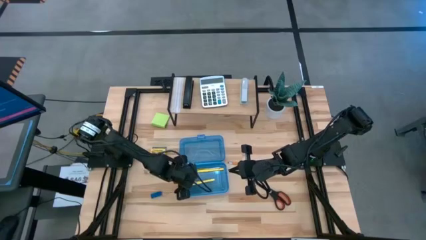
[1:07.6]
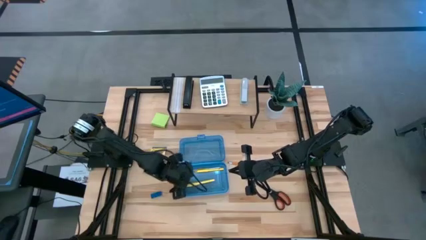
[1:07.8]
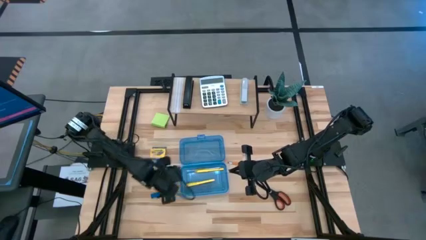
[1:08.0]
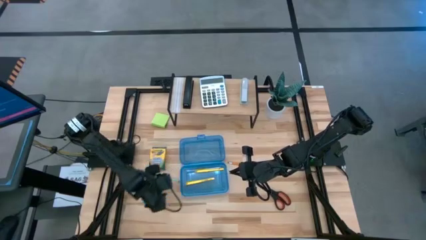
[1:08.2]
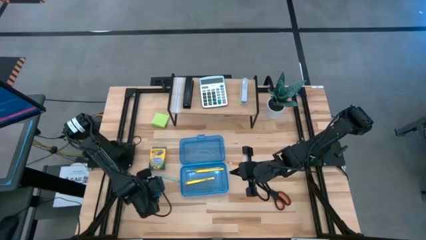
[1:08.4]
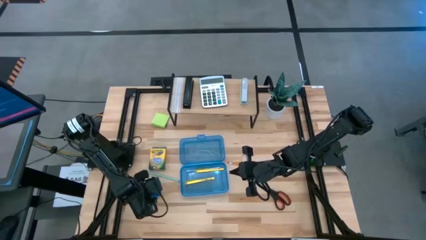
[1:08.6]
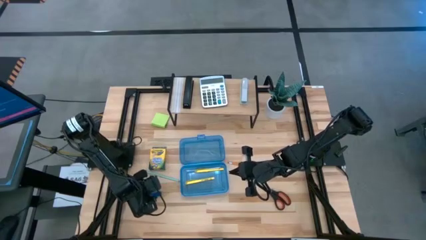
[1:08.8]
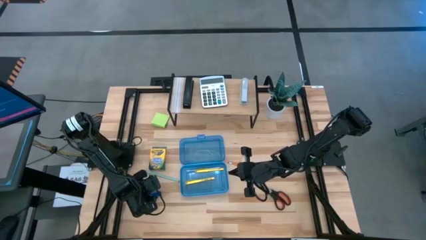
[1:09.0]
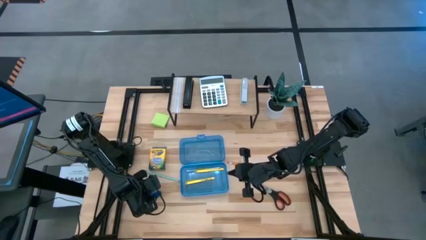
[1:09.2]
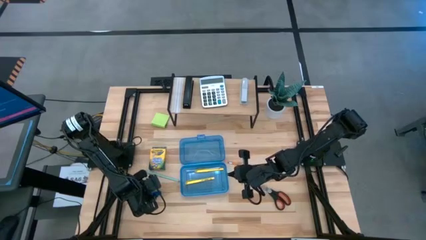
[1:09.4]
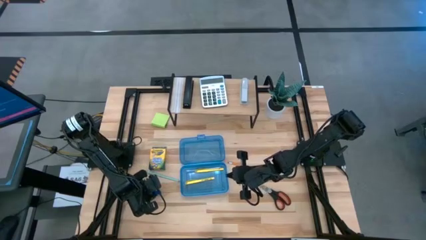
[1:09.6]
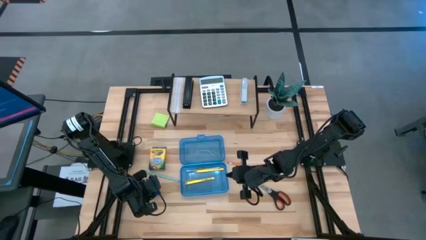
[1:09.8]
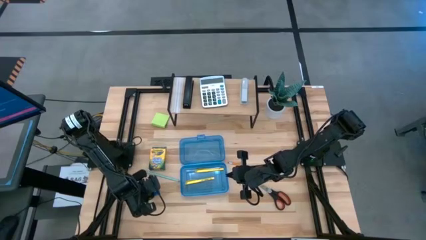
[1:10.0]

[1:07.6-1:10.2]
Task: Pack school essentials
Put the blue eraser into the blue supply box

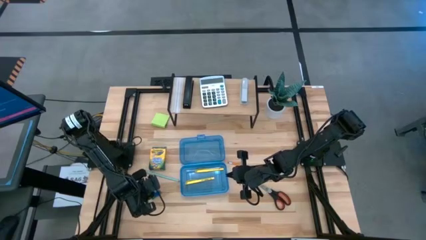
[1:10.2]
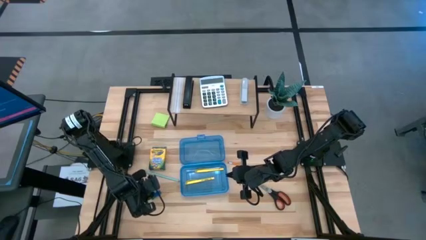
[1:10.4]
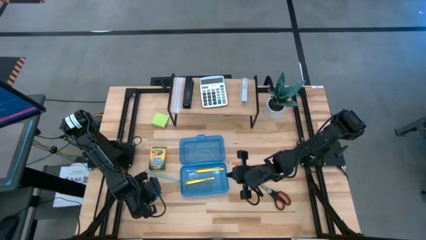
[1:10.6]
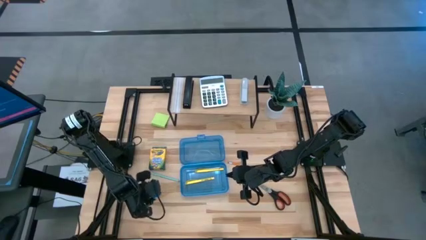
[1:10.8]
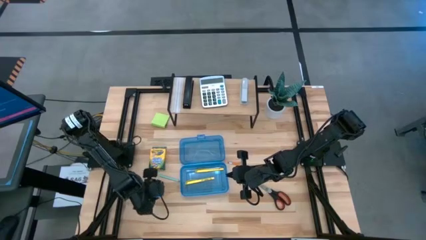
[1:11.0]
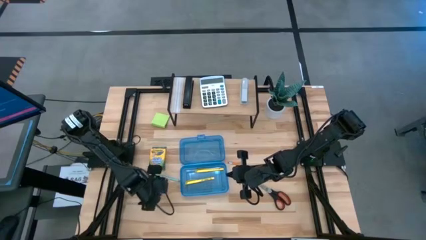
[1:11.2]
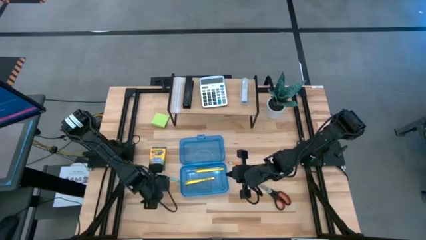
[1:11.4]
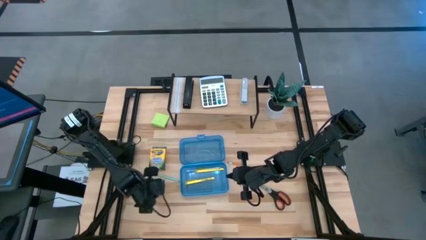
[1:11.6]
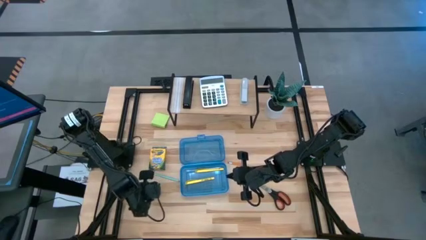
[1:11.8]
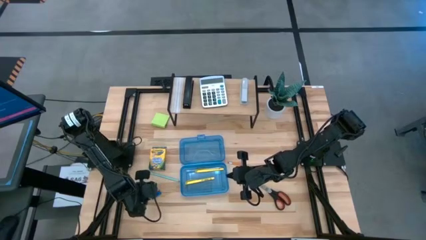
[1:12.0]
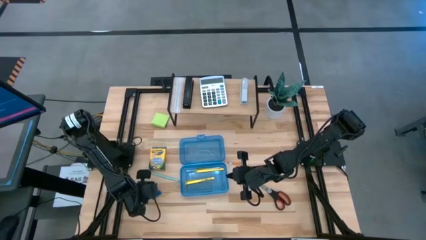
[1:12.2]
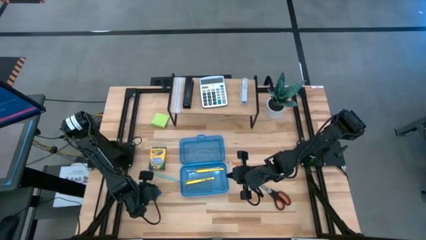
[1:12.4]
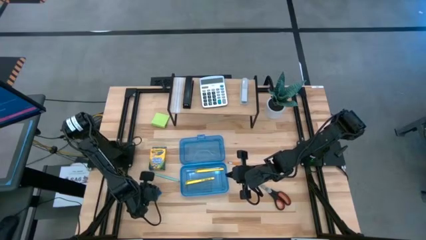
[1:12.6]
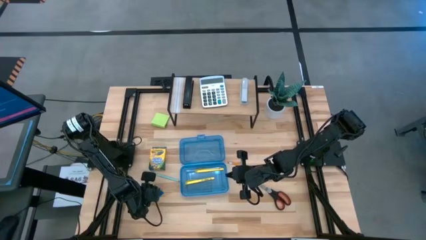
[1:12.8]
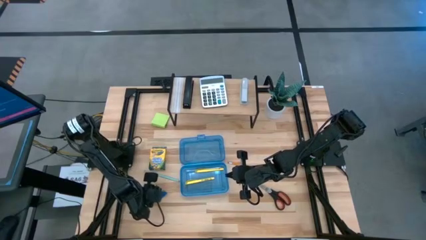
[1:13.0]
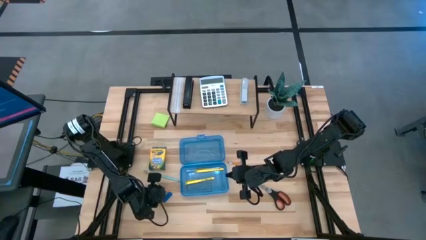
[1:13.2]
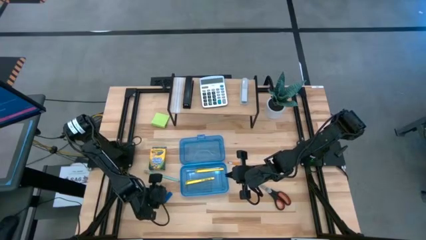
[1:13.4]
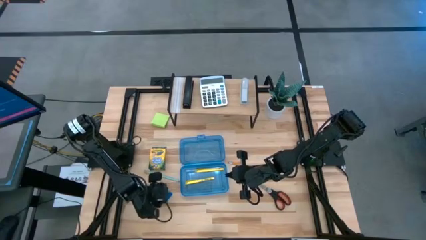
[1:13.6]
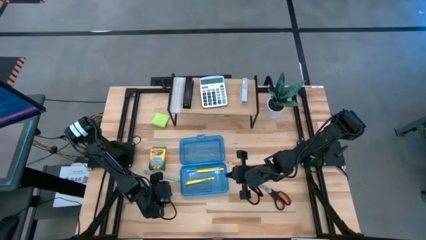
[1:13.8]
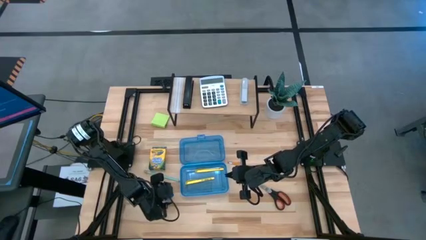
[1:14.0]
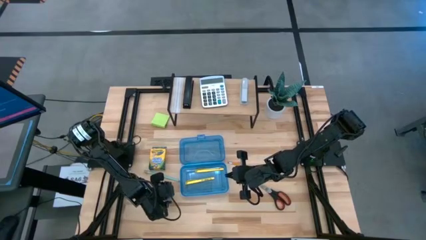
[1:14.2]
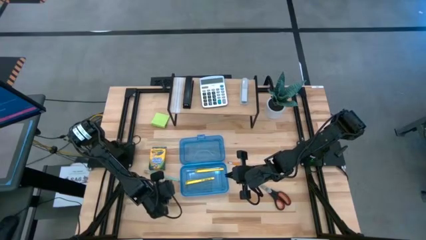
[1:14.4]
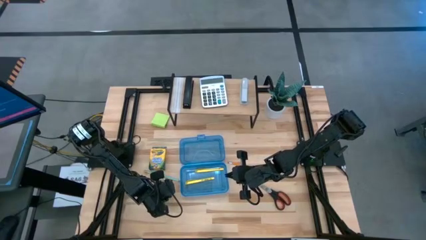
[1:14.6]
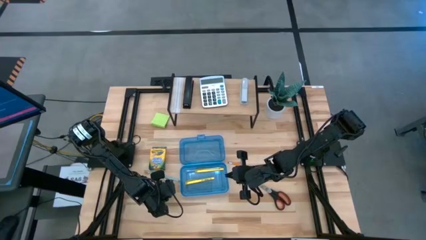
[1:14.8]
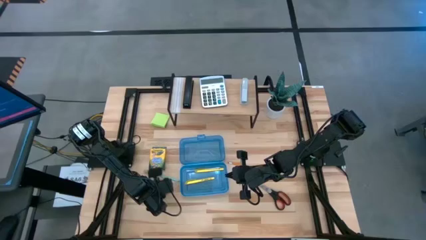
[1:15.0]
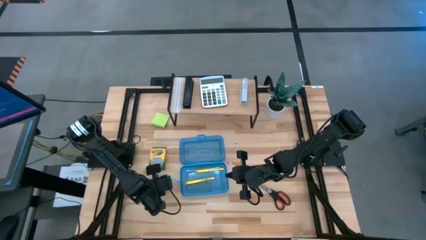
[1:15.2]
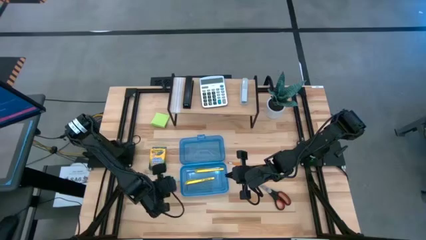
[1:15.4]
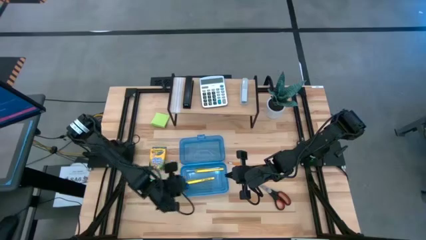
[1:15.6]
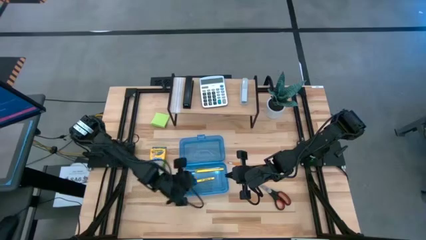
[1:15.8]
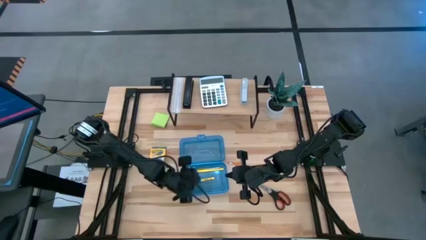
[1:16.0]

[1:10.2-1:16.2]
Put the blue eraser into the blue supply box

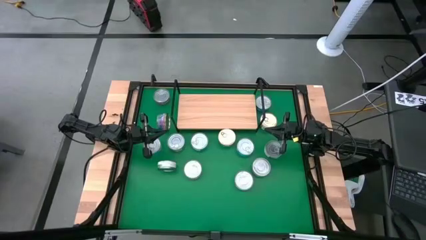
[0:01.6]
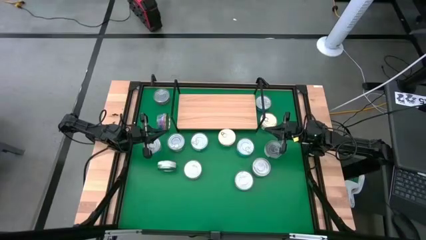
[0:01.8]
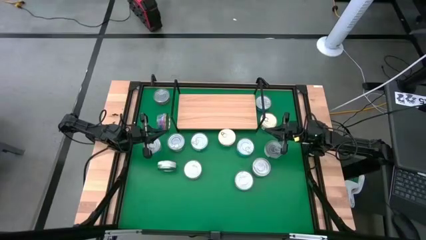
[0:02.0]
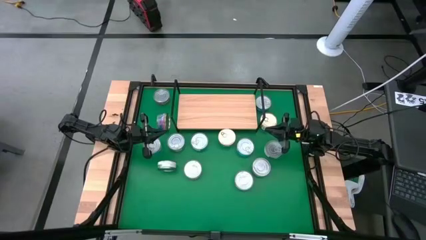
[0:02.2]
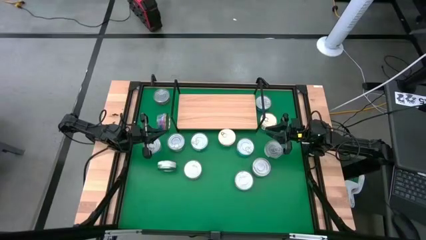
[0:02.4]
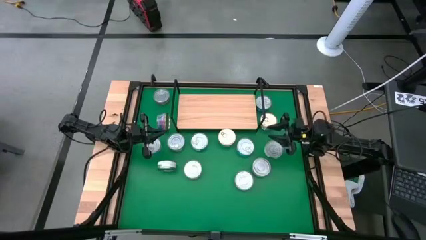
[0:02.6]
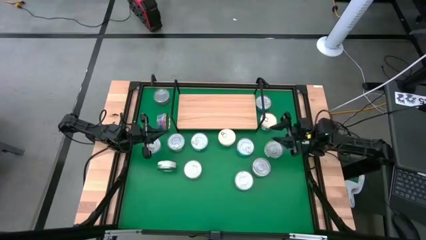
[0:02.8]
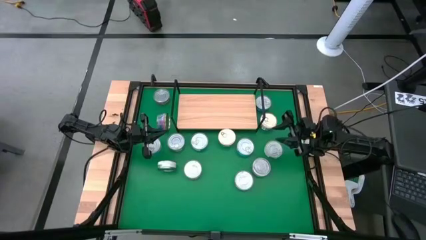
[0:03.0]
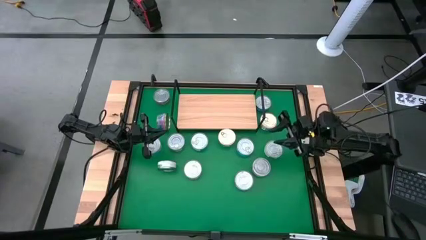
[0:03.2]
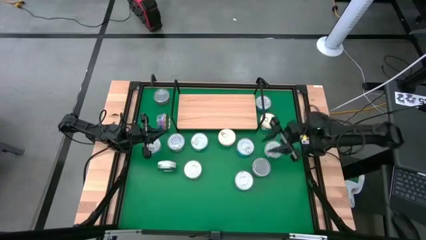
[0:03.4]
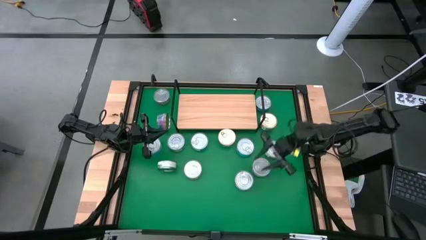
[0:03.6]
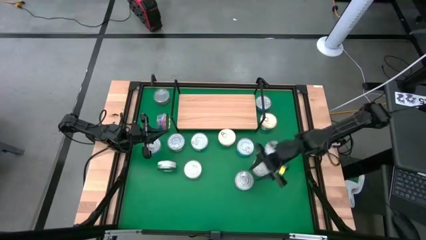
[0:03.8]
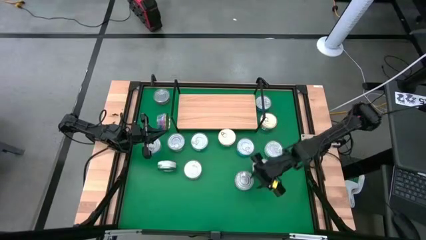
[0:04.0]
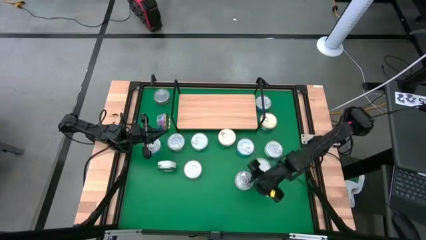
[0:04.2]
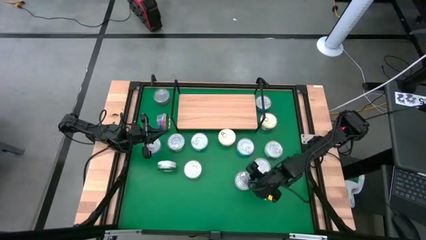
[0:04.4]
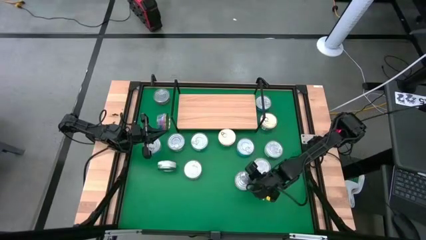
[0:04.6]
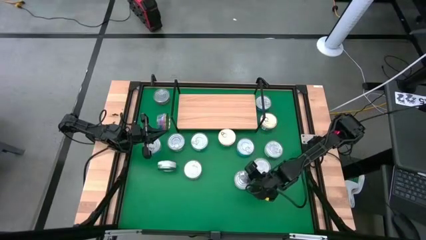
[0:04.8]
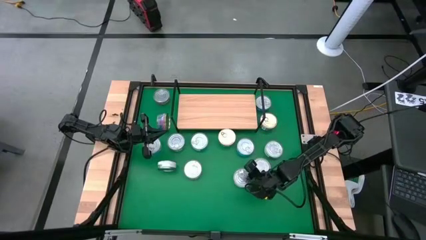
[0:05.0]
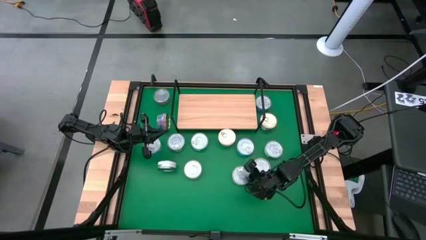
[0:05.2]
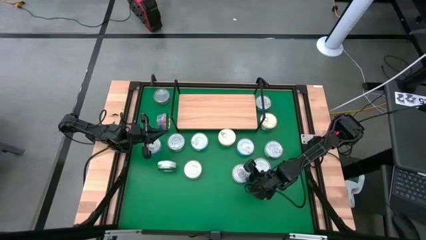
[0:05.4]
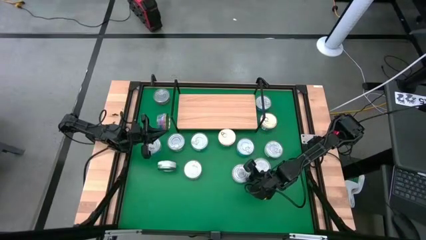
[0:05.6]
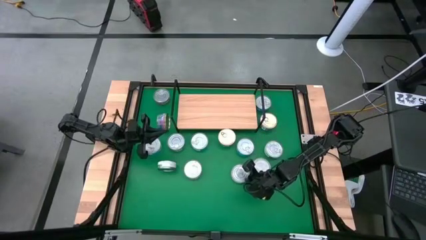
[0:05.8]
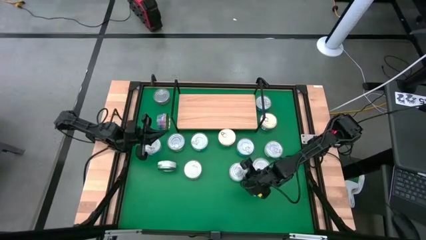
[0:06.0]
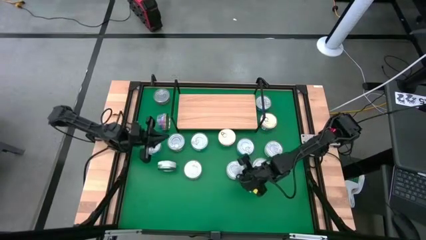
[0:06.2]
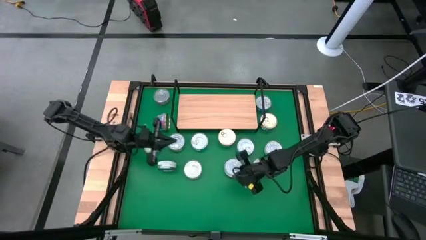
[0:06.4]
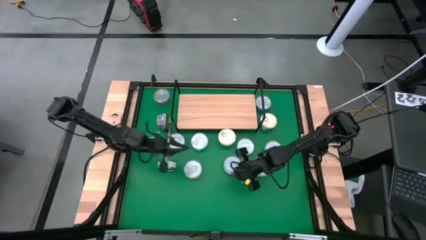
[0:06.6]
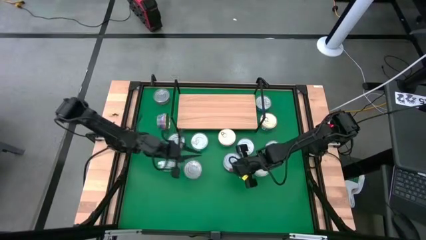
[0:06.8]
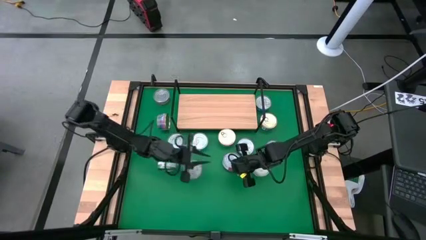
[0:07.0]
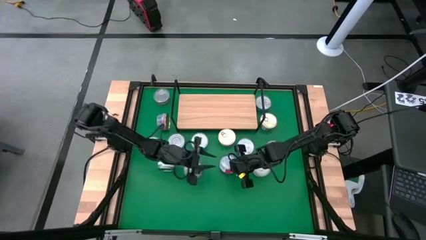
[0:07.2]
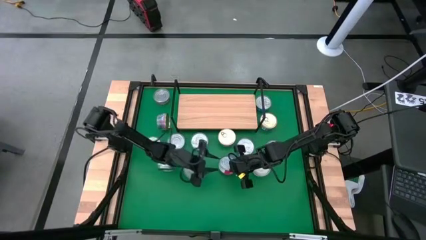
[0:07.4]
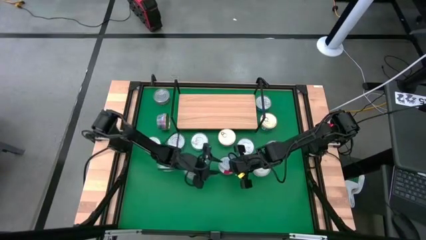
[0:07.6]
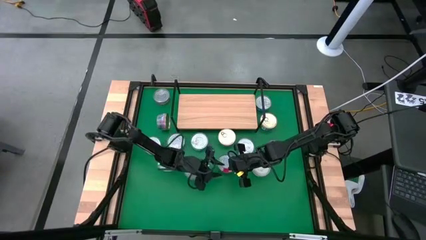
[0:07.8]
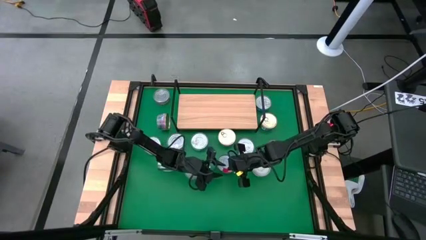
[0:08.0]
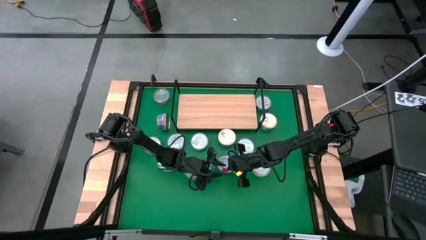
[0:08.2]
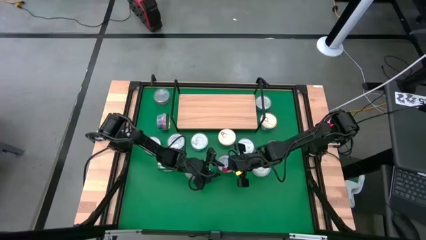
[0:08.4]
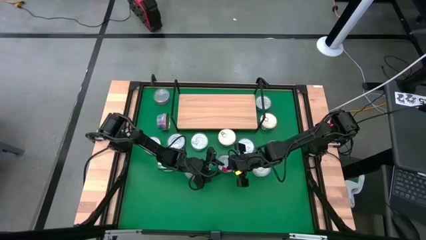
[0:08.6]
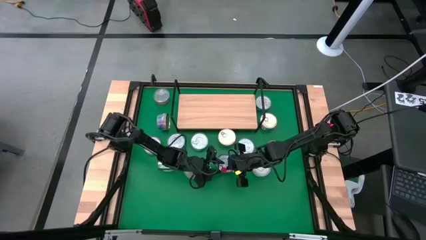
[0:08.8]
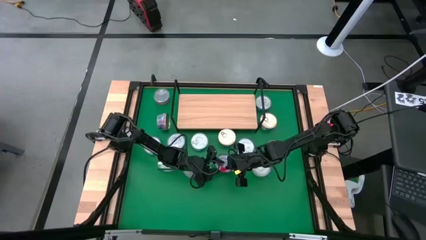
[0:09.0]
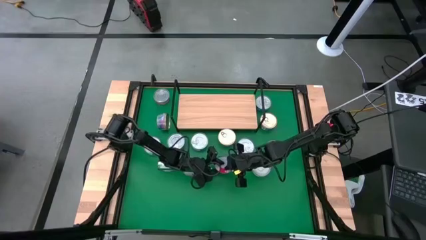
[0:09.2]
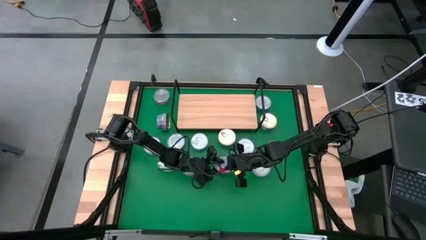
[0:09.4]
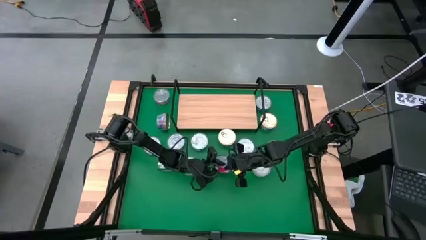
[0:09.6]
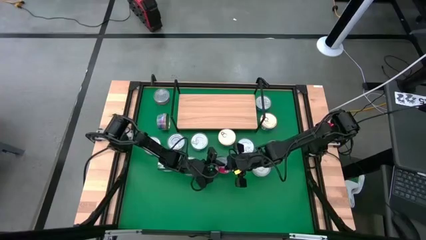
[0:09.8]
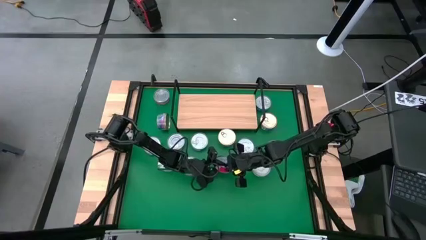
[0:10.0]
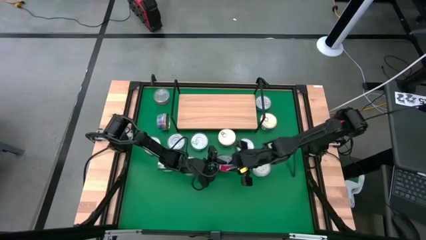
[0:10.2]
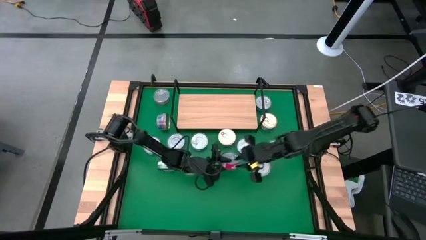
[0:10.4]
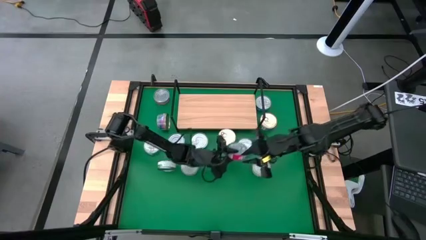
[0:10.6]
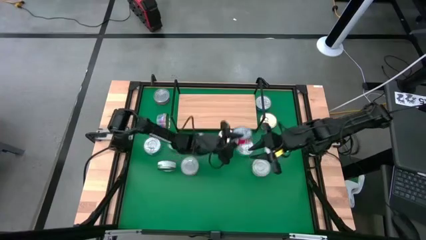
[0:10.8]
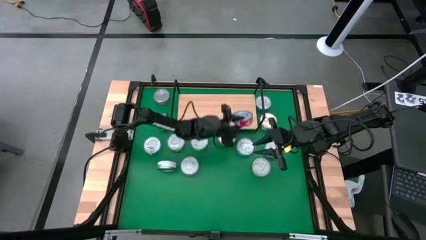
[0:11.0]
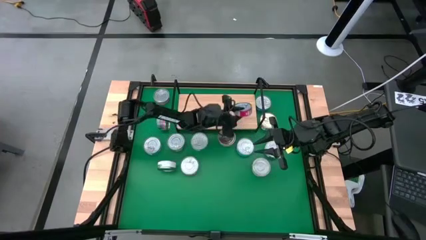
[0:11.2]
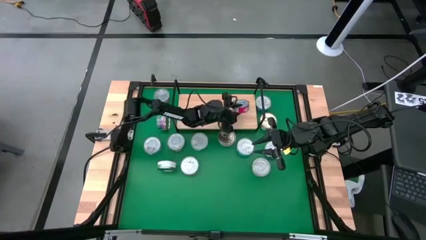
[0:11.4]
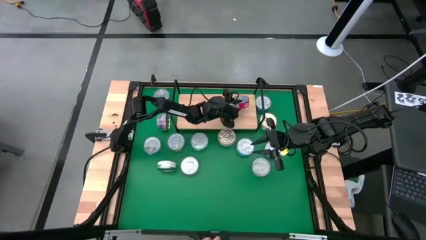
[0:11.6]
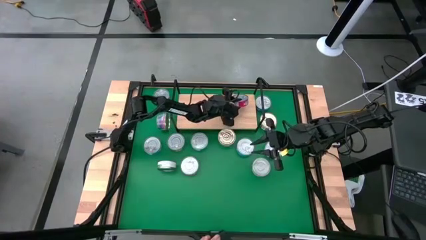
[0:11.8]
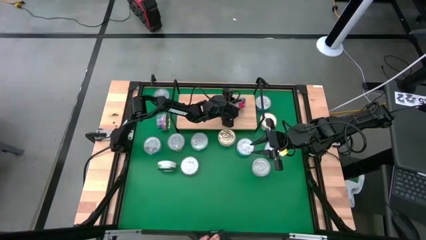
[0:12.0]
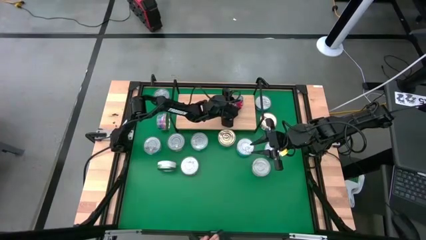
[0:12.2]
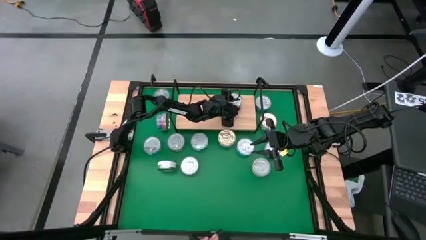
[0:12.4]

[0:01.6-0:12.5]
Task: Stack canned seafood by type on shelf
Put the red tuna can on the shelf
